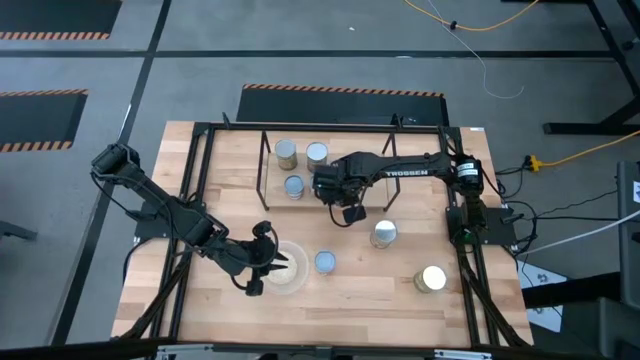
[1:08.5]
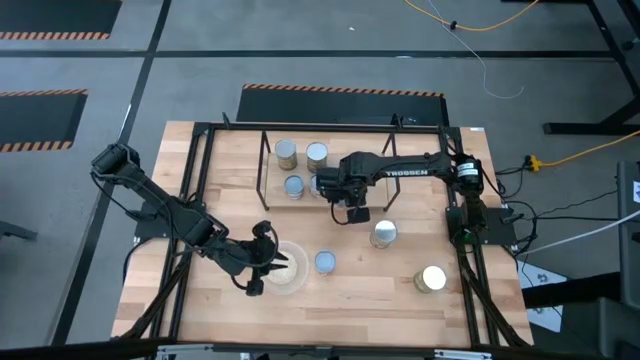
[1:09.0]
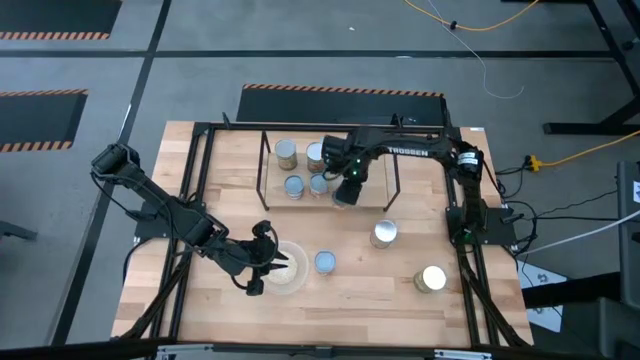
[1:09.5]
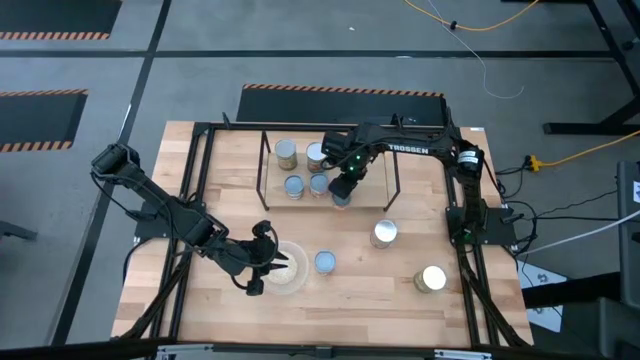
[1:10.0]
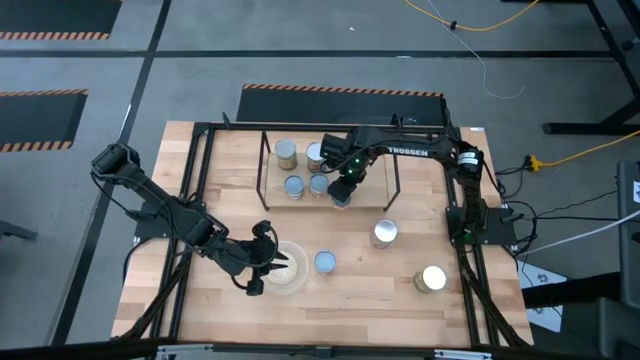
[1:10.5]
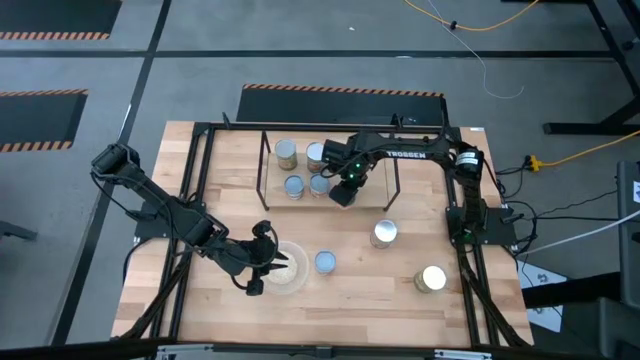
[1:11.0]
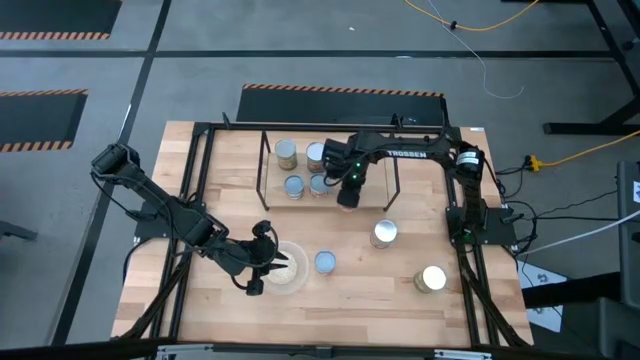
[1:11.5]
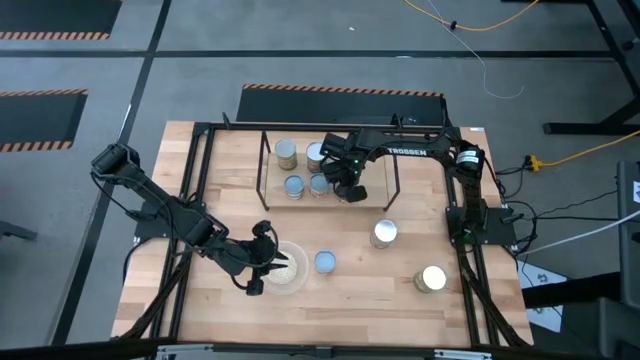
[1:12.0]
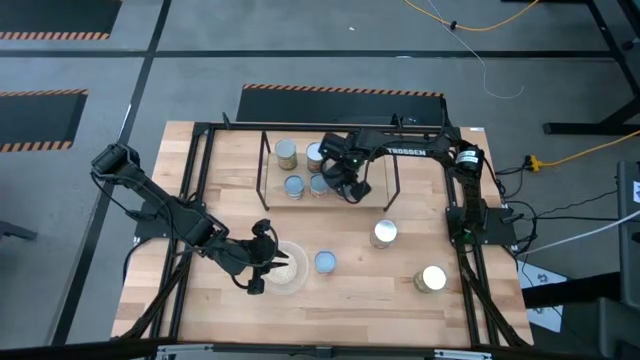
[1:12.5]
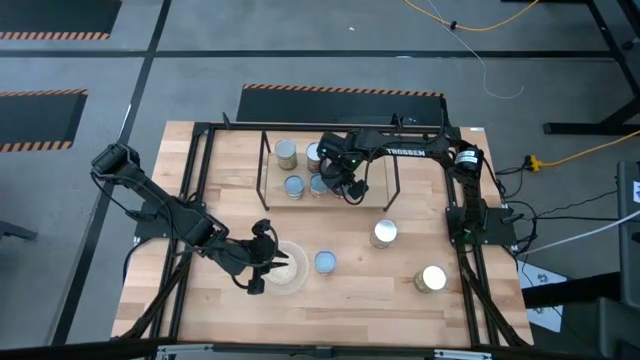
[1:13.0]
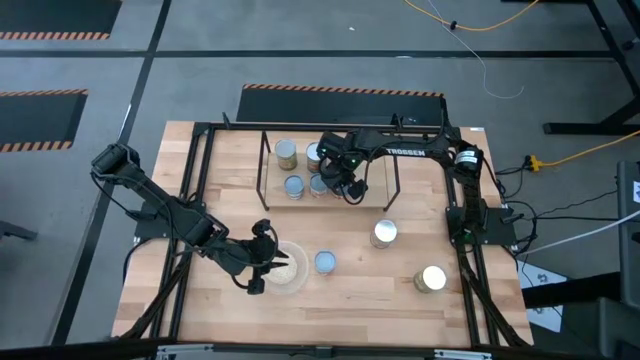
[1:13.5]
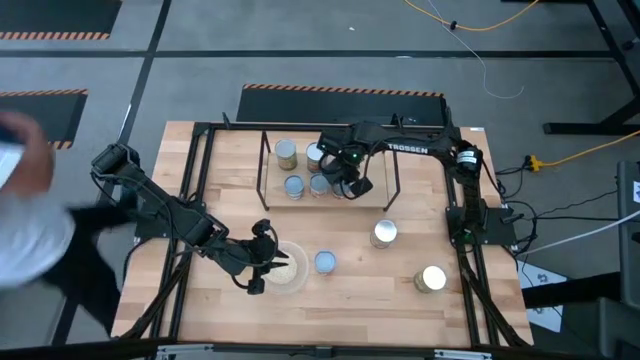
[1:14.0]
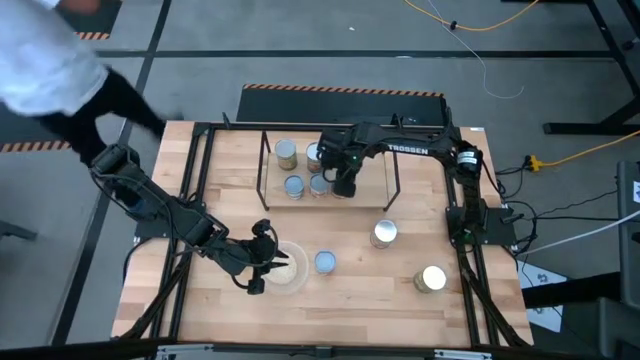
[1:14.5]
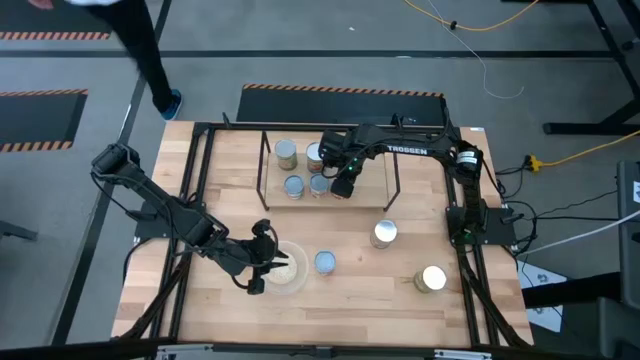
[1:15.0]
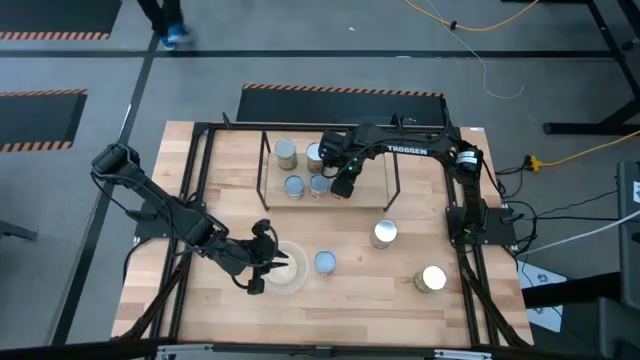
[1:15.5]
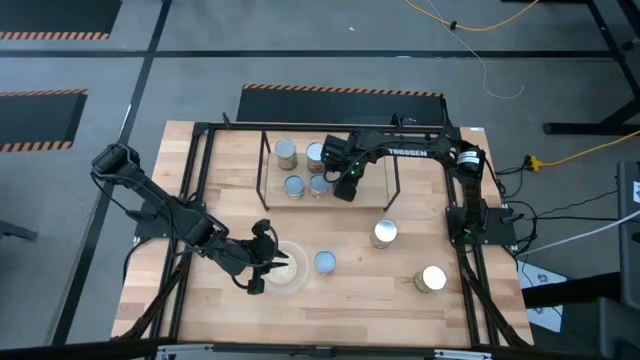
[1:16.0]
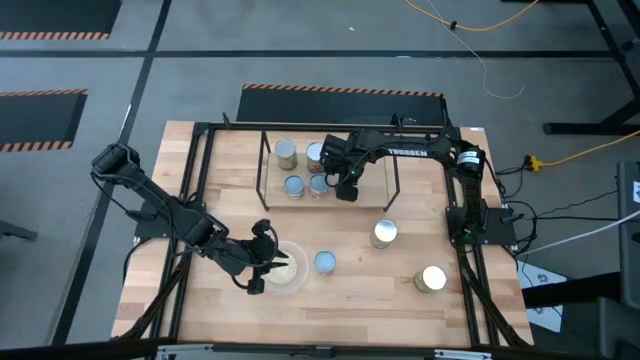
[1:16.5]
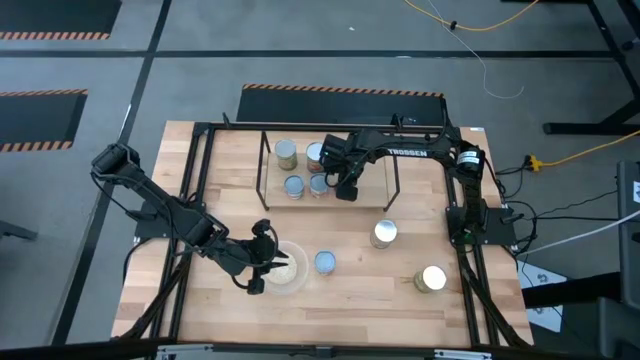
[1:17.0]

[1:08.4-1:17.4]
Task: Pick and place cans onto a shelf
Adjust the canned pineapple on the shelf

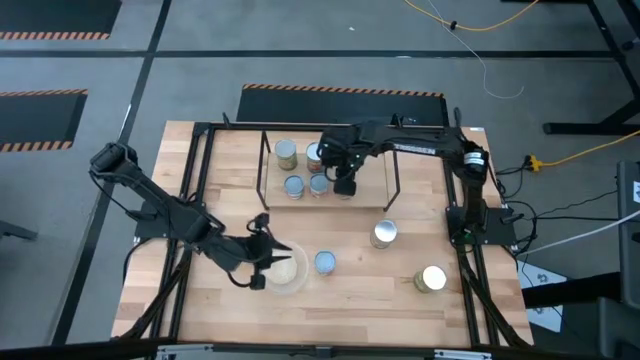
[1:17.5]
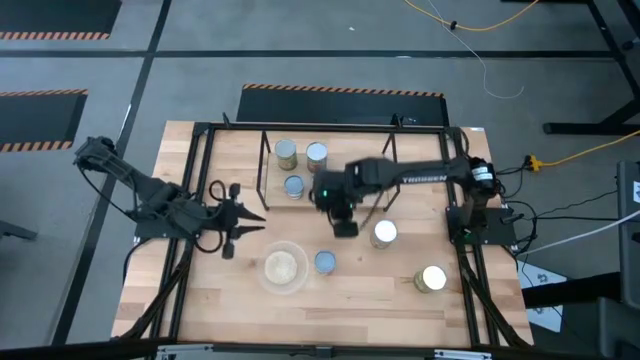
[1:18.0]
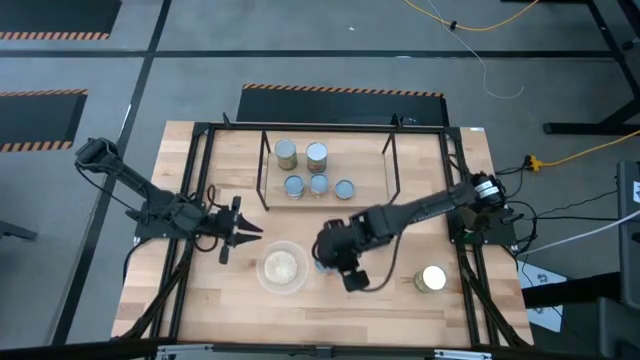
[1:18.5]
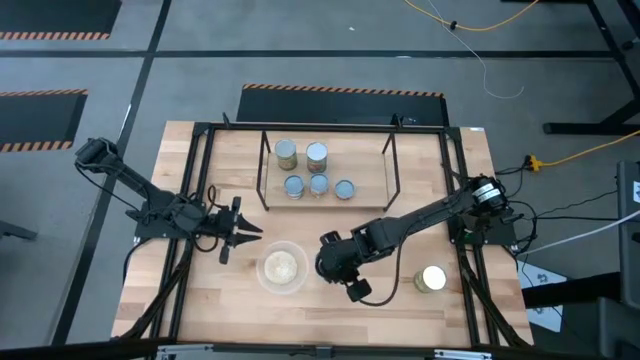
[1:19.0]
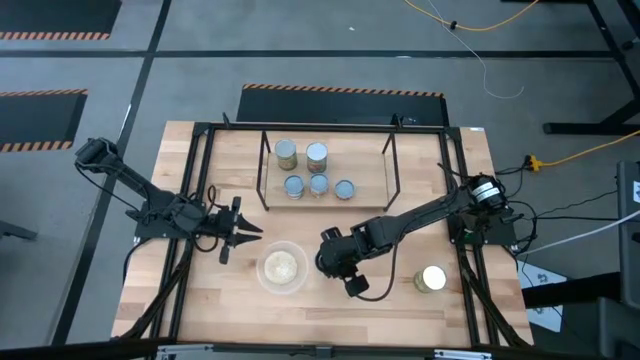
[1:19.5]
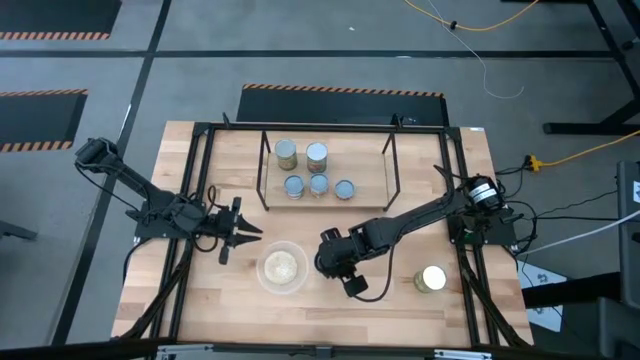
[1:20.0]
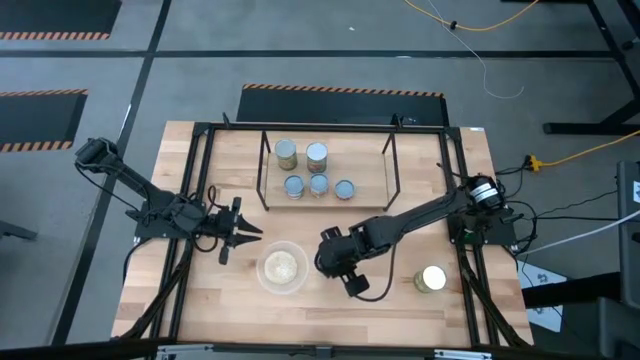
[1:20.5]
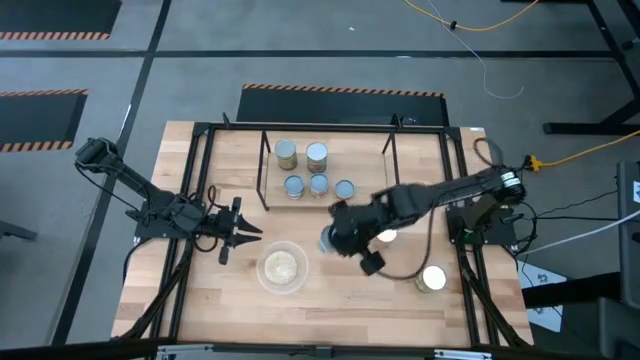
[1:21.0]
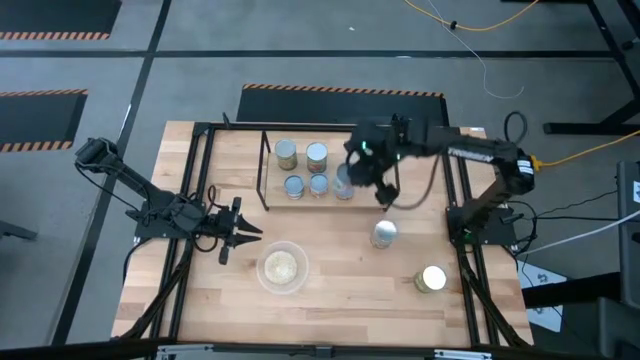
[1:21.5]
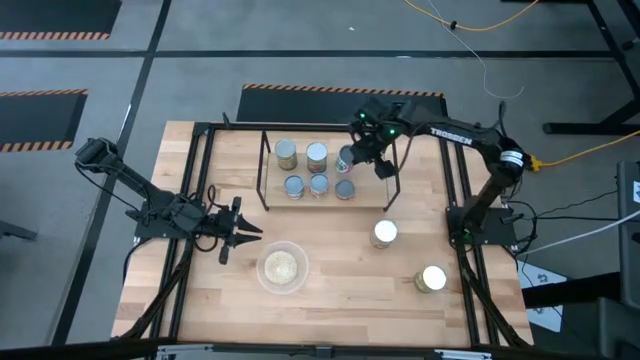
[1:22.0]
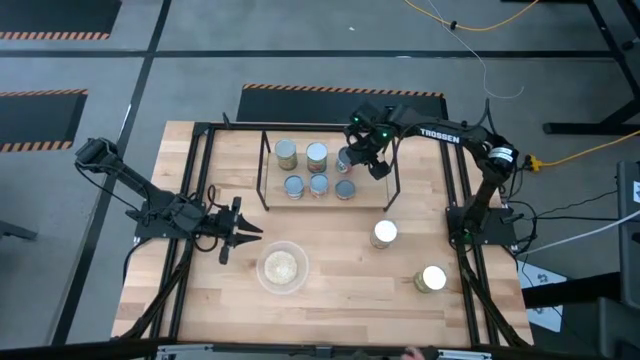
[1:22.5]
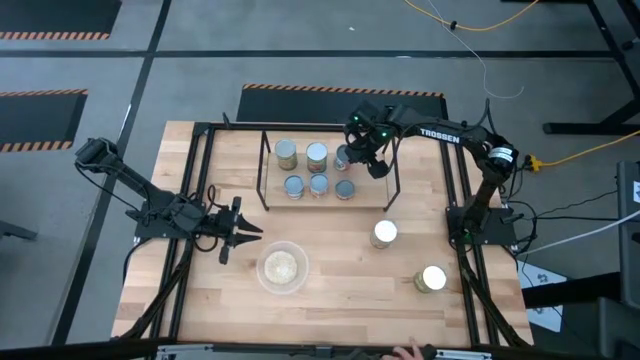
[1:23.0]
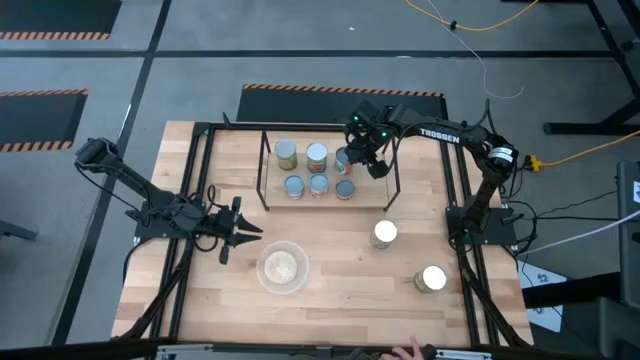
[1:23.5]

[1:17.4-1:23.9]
Put the canned mixed fruit on the shelf

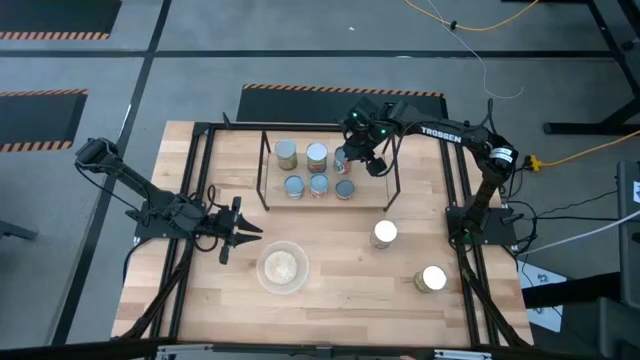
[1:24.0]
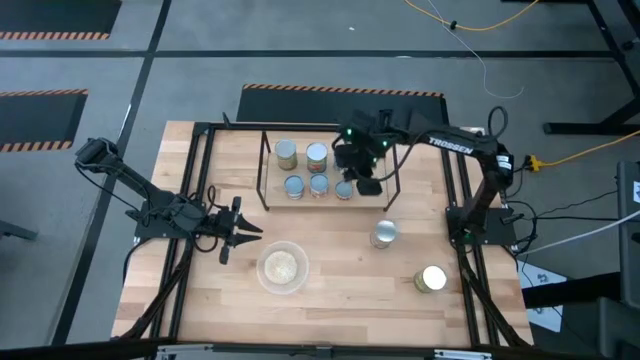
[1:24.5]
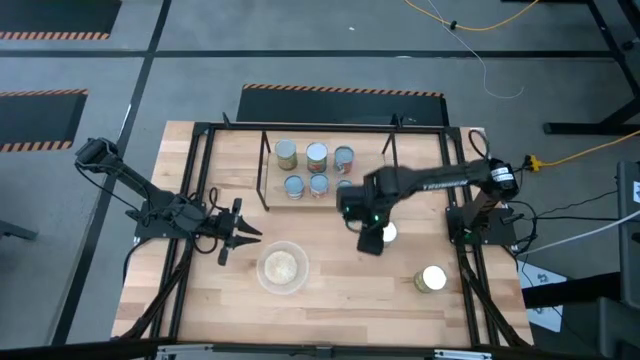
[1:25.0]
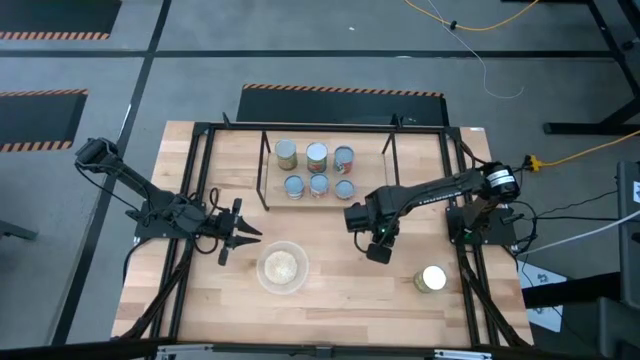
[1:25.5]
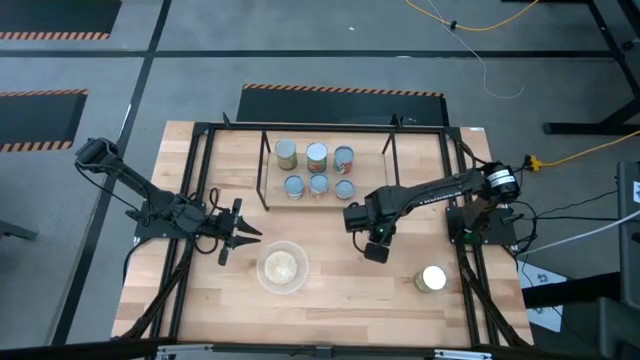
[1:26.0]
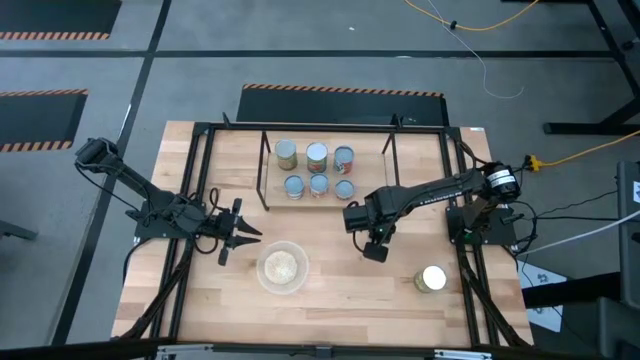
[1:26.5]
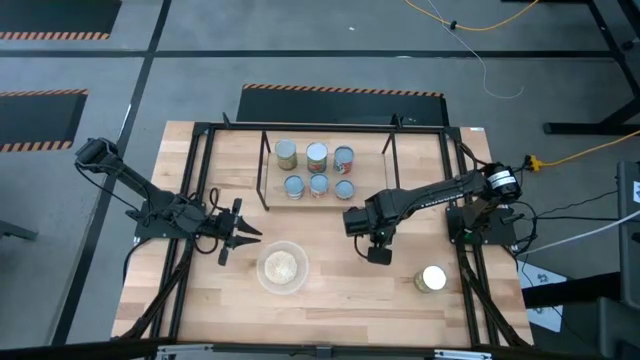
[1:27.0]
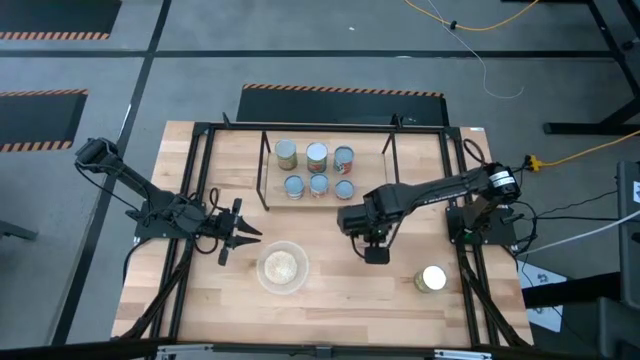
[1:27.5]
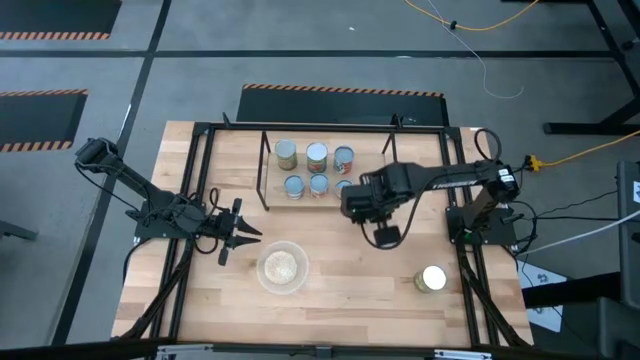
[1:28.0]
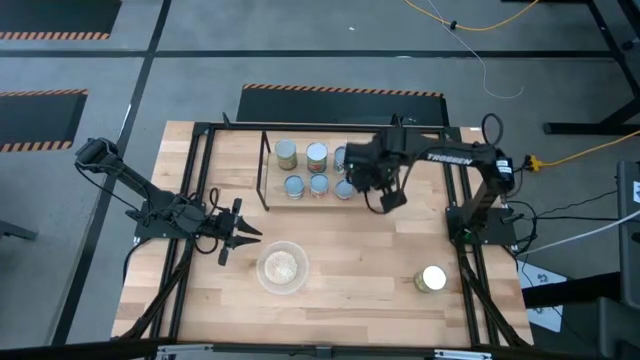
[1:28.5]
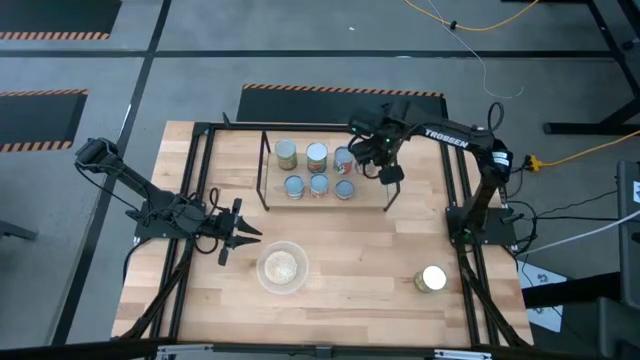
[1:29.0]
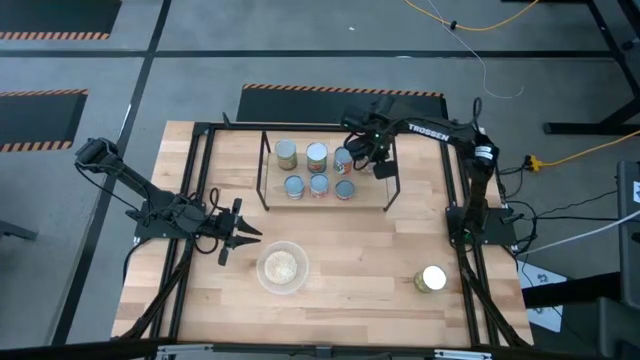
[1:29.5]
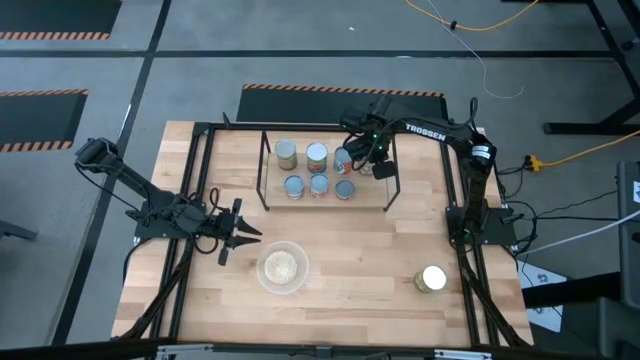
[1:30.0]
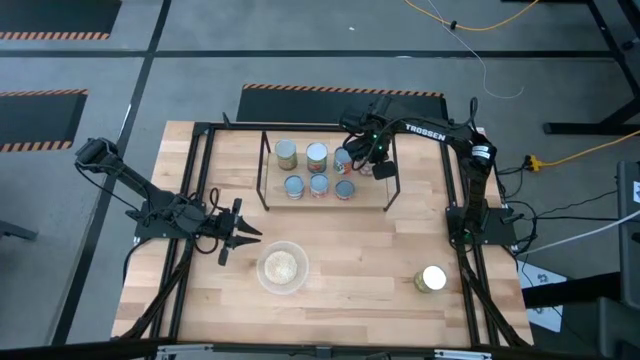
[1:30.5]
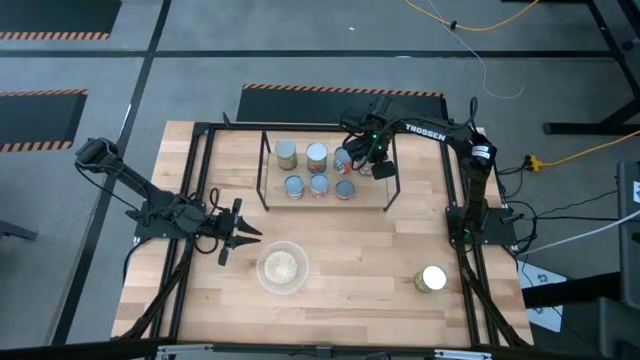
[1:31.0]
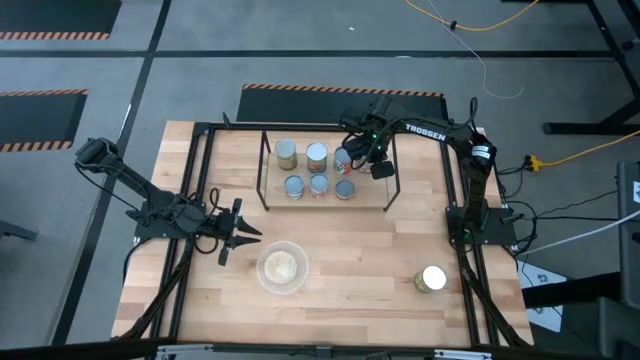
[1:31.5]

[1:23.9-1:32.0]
Put the canned peaches on the shelf
